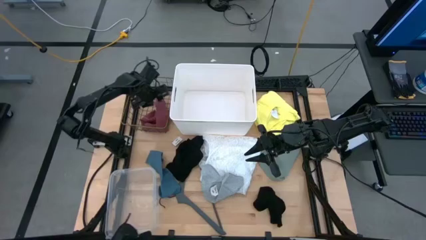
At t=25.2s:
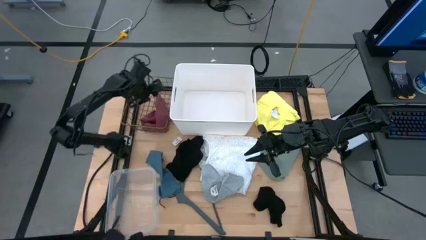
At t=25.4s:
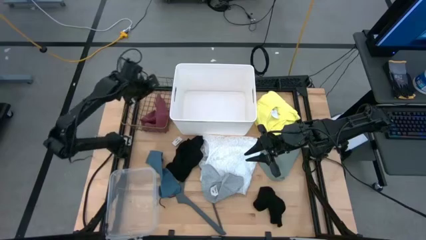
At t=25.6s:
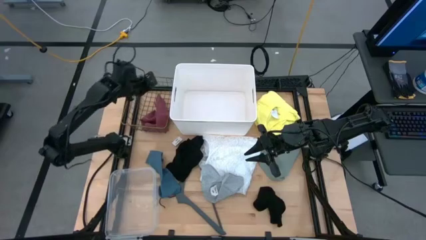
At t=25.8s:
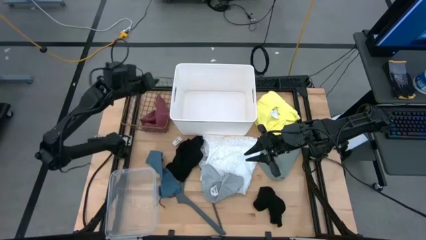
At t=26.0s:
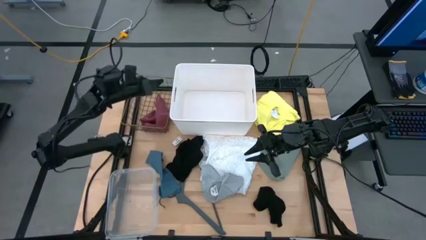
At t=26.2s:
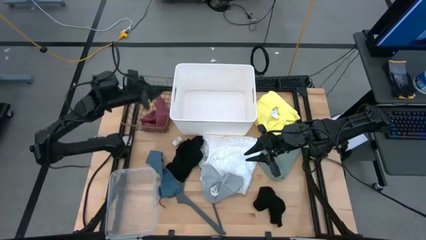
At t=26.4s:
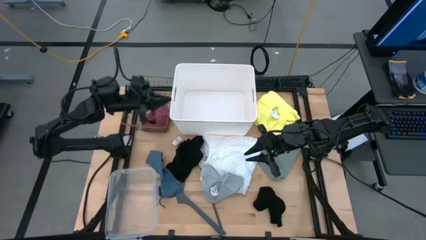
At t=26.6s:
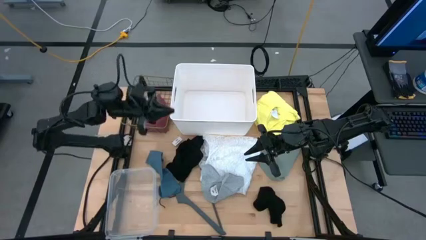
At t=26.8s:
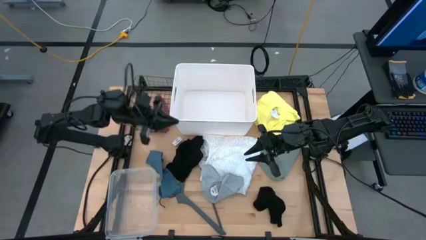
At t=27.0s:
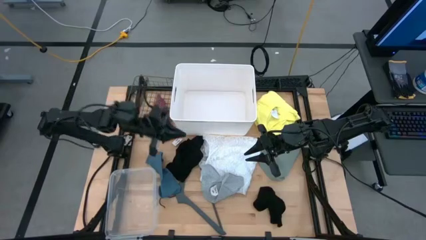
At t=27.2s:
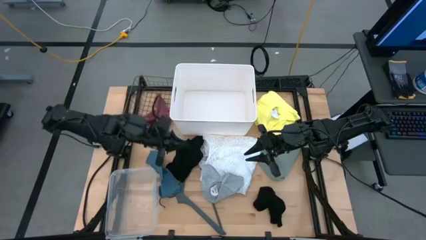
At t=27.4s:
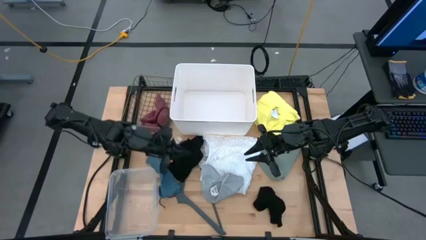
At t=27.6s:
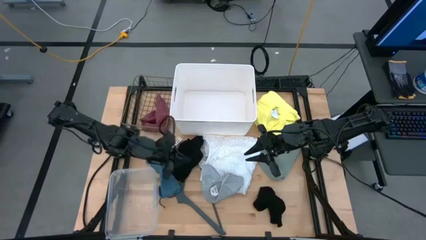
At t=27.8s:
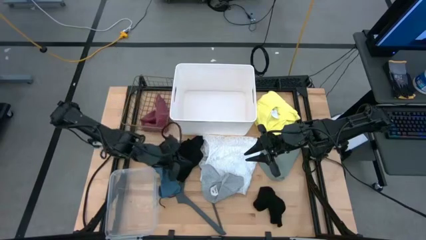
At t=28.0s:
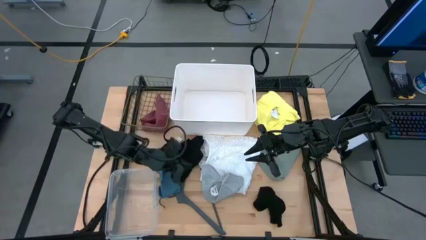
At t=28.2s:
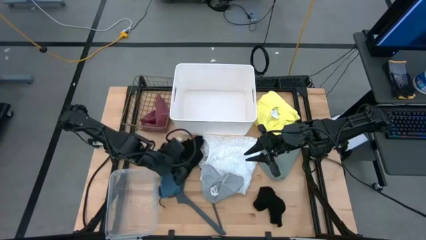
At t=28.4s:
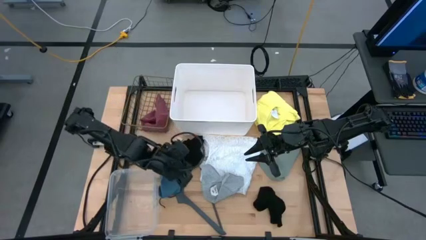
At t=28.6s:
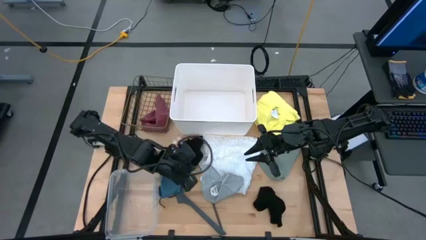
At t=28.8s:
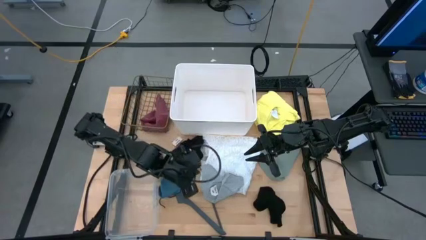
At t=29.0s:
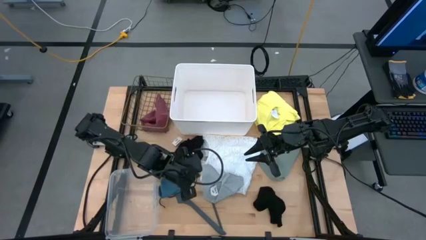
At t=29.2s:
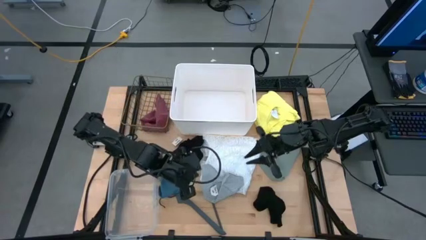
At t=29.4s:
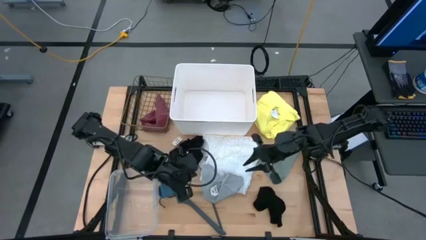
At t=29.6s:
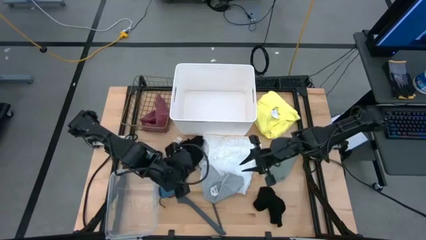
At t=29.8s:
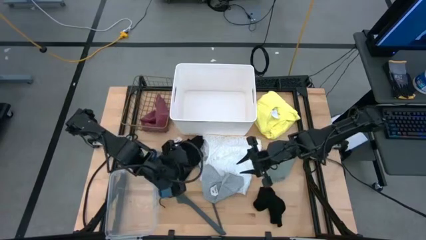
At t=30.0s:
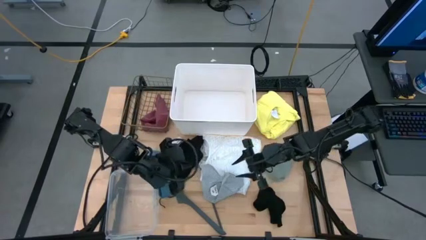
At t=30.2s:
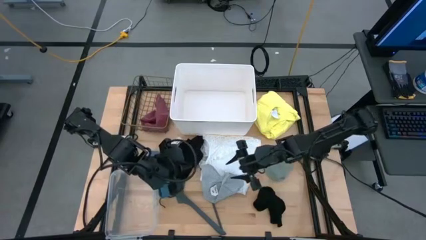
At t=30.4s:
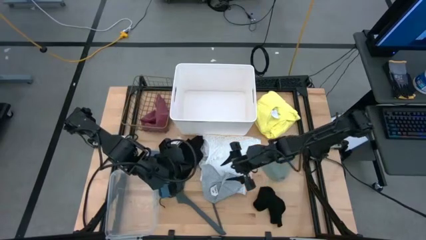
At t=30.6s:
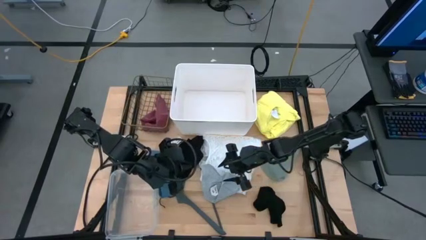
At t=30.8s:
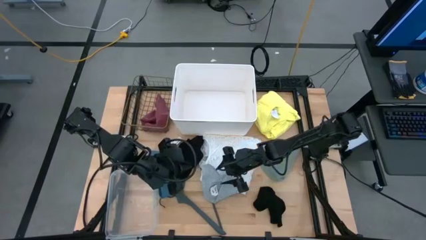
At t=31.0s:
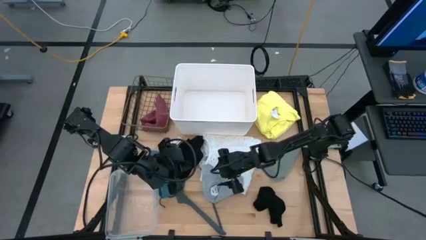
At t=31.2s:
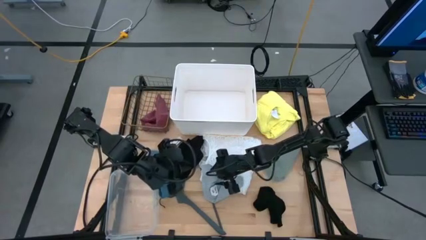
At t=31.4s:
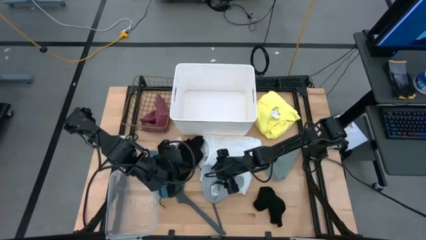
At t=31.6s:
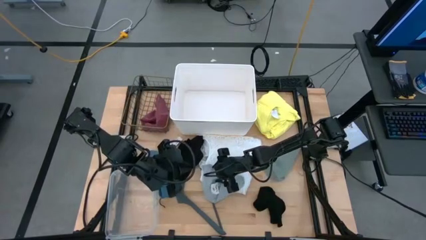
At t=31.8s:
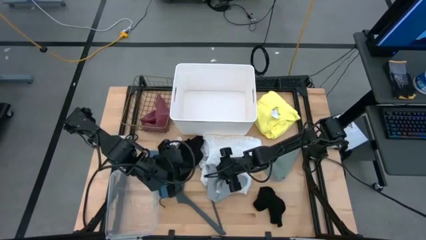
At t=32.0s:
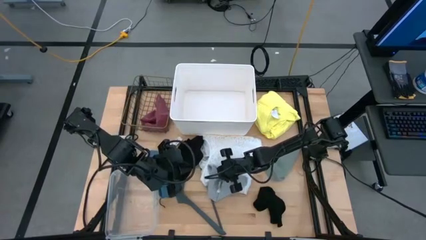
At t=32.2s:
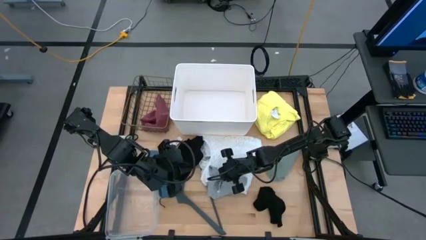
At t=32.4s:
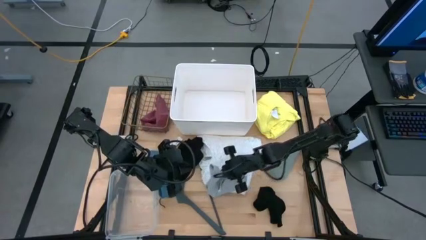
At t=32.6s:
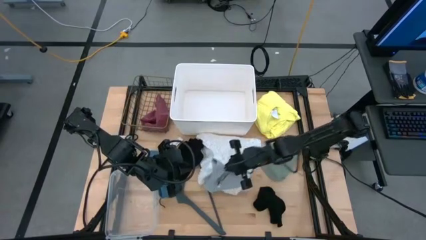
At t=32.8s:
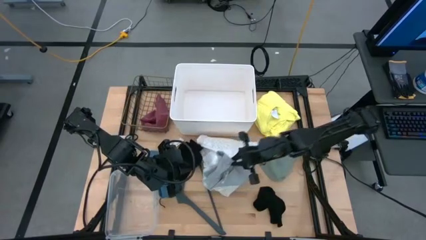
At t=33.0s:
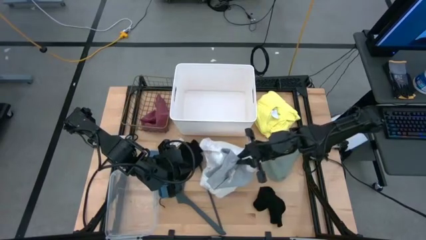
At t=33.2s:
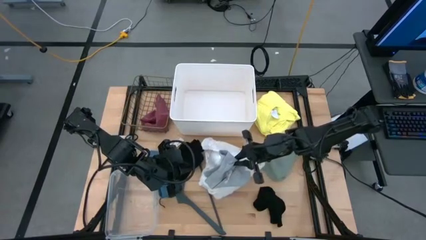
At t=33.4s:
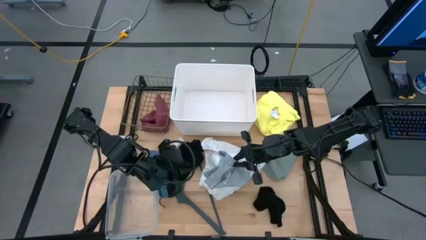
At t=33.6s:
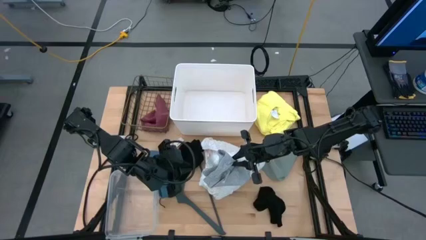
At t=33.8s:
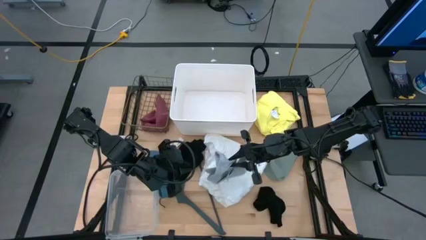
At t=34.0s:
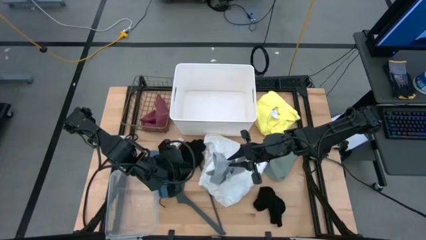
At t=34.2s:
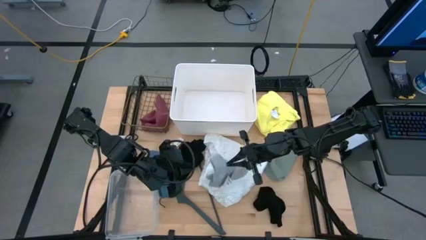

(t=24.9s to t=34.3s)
Task: Pick & Place Cloths
Put the gray underwear into the brown basket

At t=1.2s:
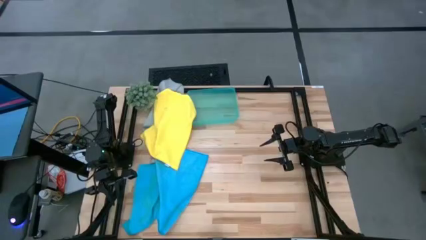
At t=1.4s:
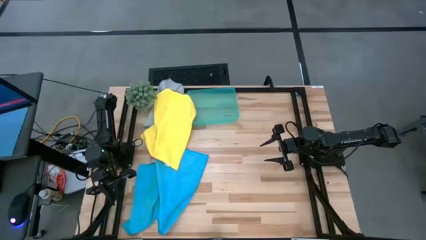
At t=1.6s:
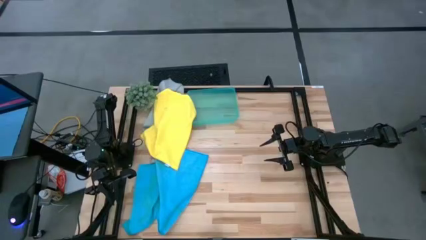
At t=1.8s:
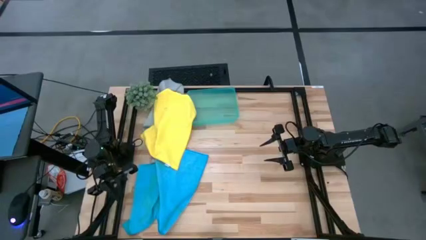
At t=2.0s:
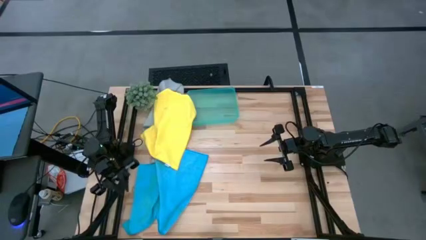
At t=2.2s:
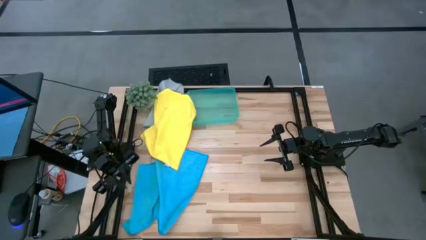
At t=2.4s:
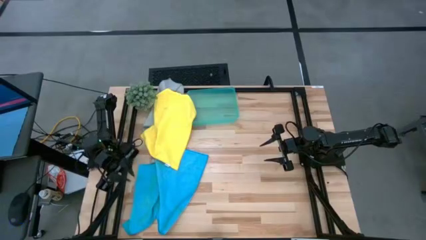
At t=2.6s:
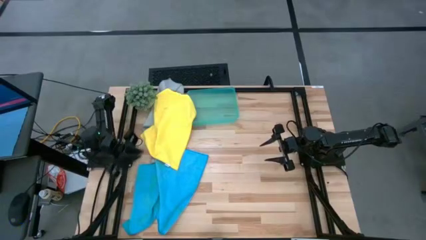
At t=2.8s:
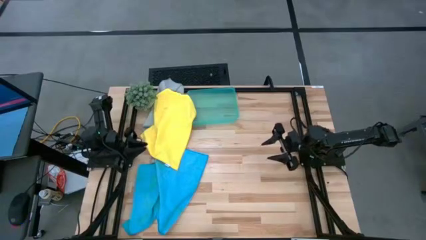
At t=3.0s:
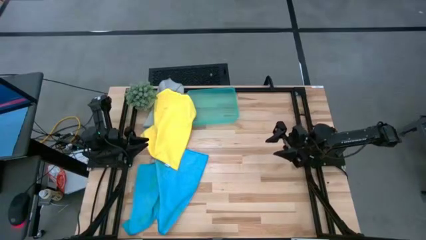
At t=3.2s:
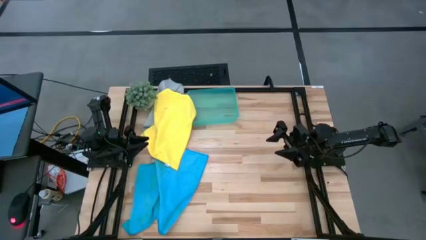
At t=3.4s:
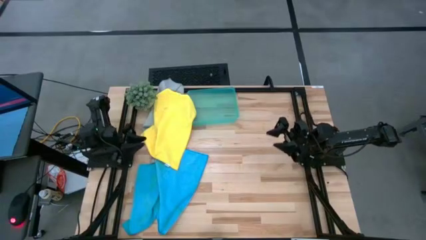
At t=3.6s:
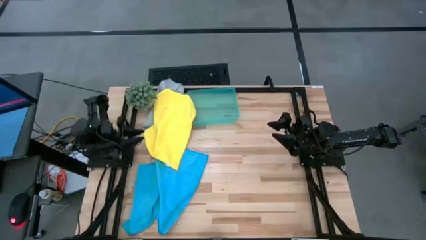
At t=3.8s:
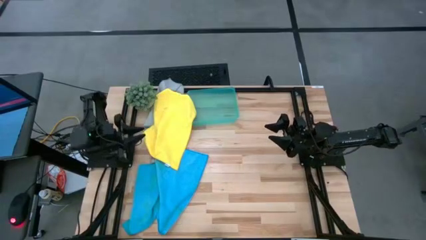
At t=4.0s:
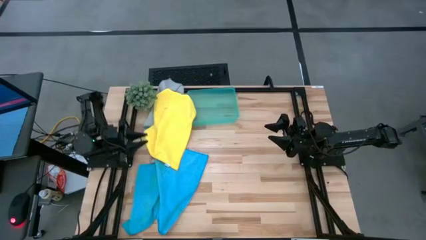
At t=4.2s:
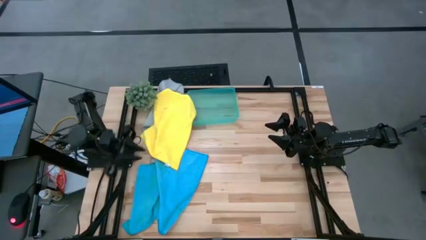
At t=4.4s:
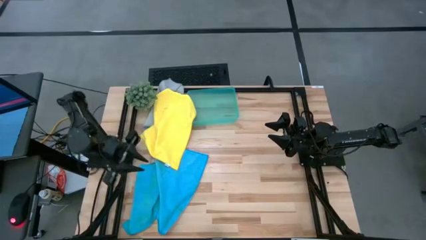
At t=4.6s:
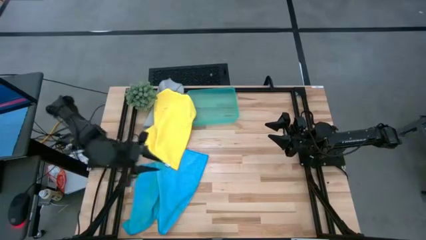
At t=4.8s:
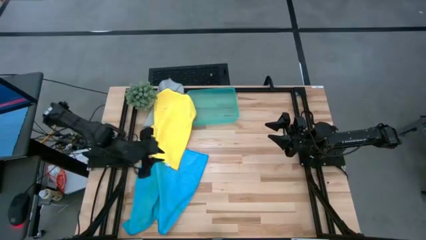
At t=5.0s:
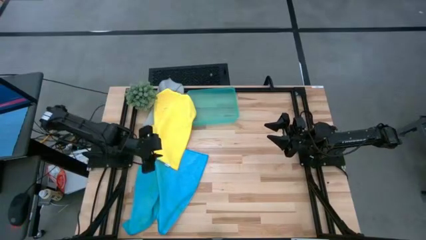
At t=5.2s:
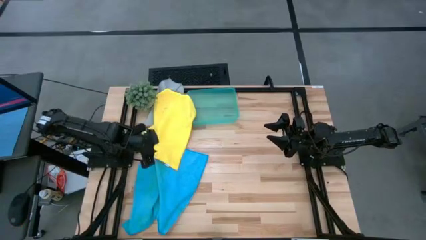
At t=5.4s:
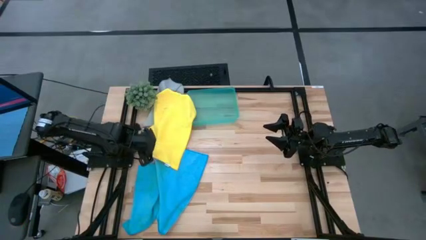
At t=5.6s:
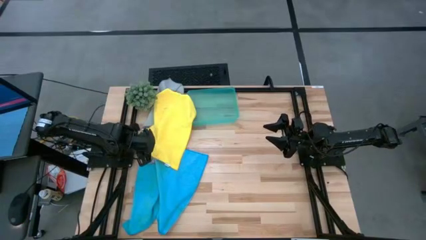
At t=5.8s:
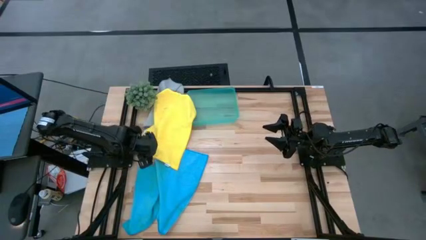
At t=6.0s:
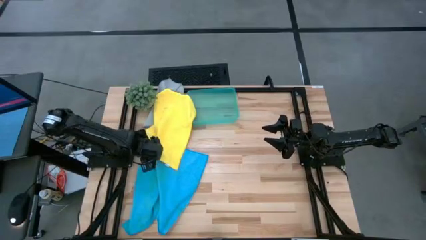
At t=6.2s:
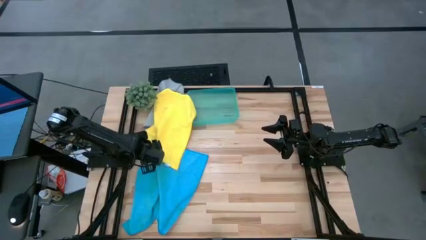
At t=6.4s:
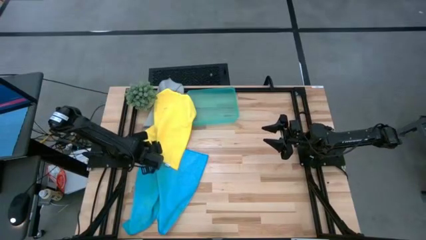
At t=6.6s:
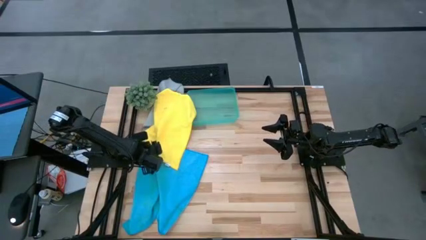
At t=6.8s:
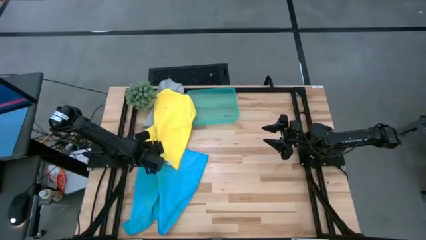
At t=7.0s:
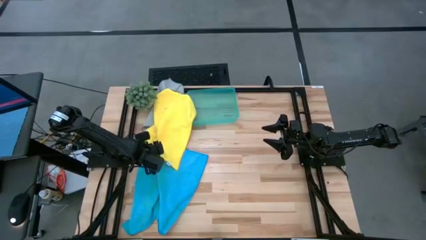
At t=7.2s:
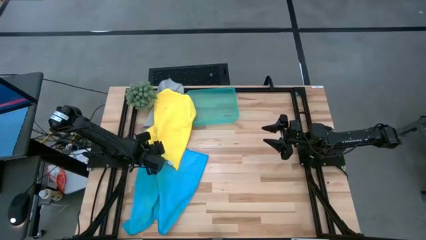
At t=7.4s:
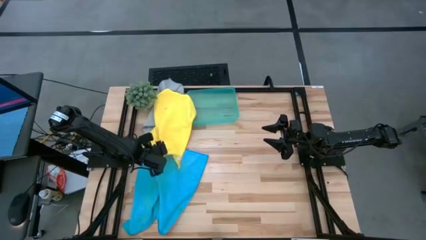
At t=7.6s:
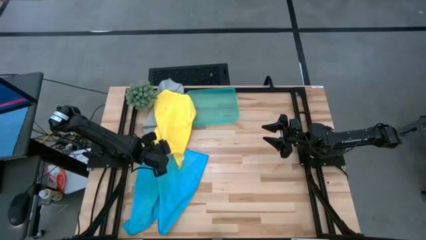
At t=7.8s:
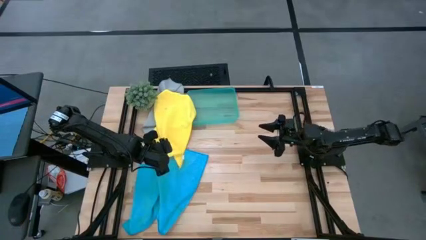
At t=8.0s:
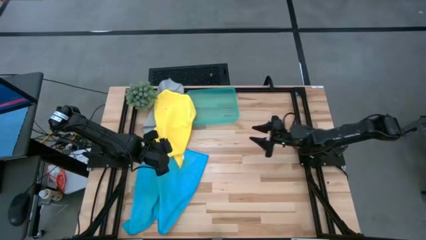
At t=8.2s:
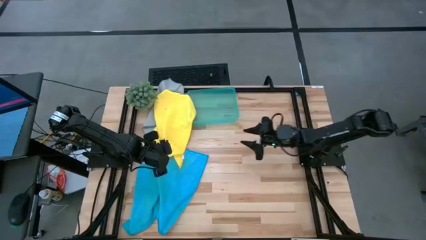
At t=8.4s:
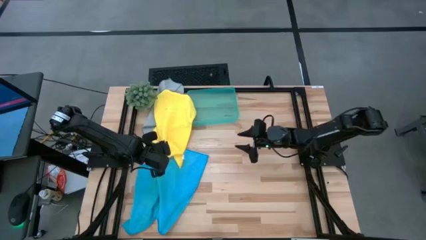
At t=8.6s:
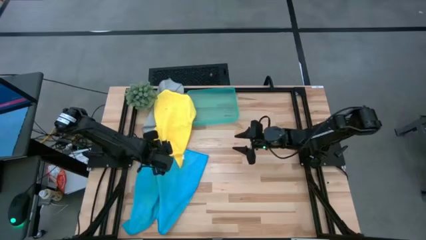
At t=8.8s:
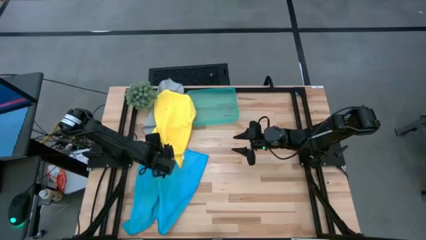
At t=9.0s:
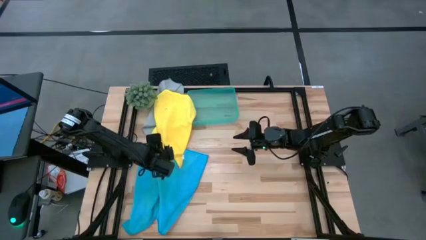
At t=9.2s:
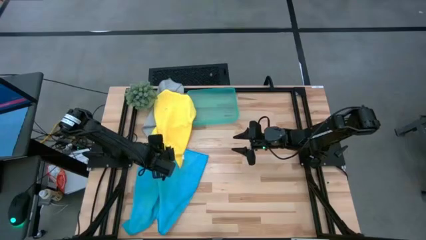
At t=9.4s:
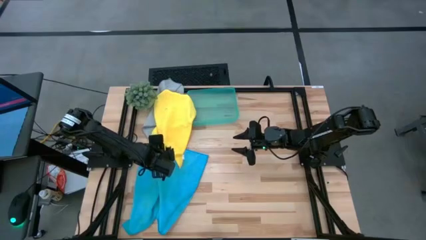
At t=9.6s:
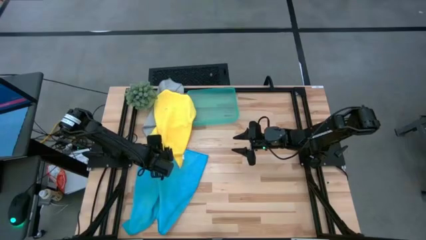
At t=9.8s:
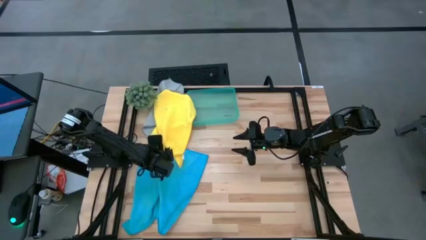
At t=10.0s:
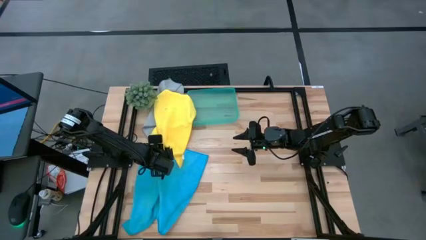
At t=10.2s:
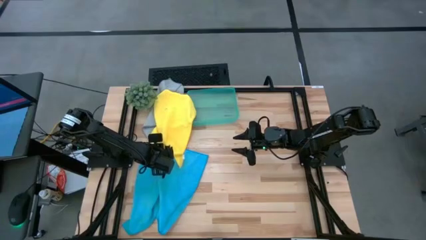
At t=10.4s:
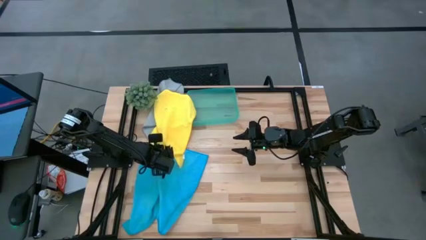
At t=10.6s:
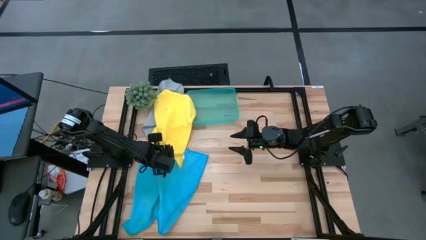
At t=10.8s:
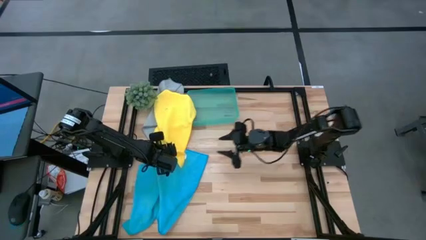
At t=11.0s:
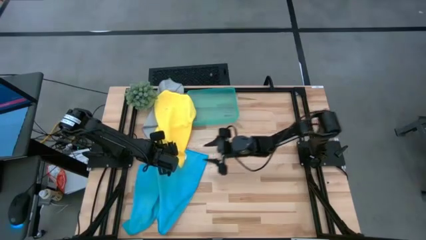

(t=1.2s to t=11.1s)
Task: Fold microfiber towels
Fold the yellow microfiber towel
